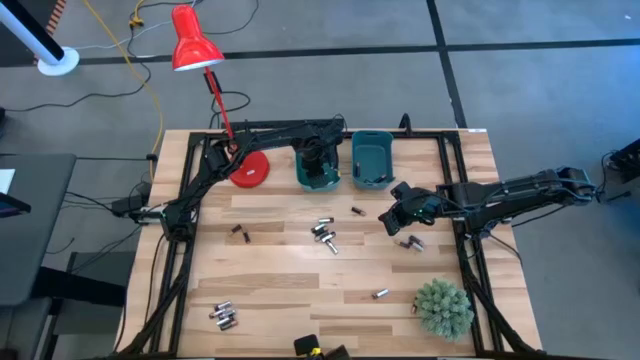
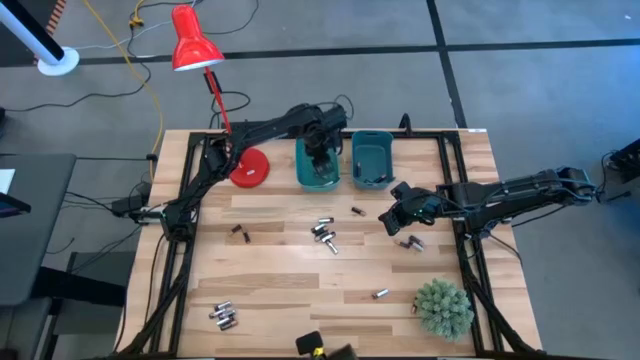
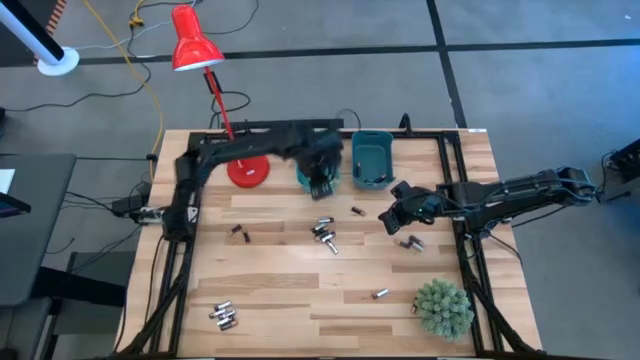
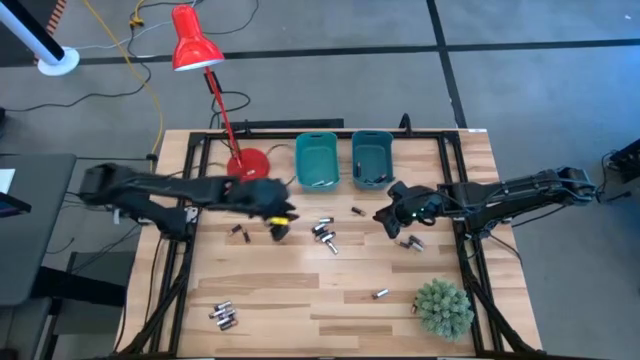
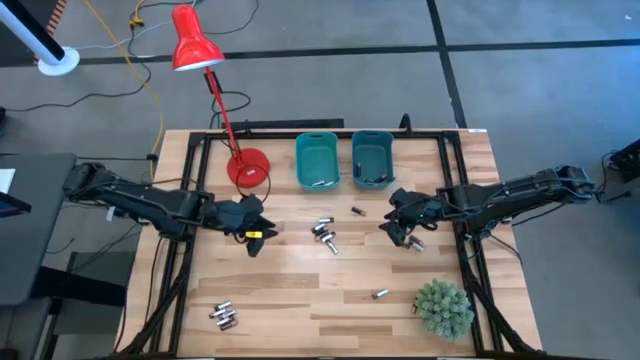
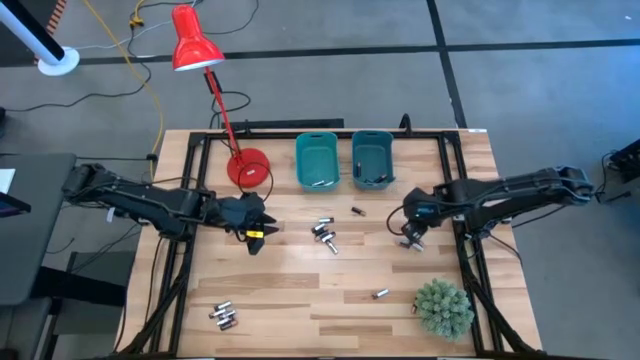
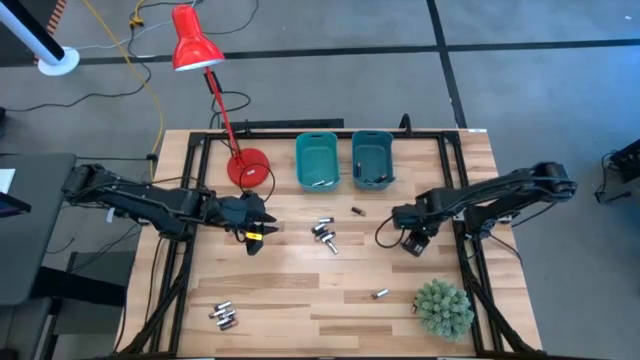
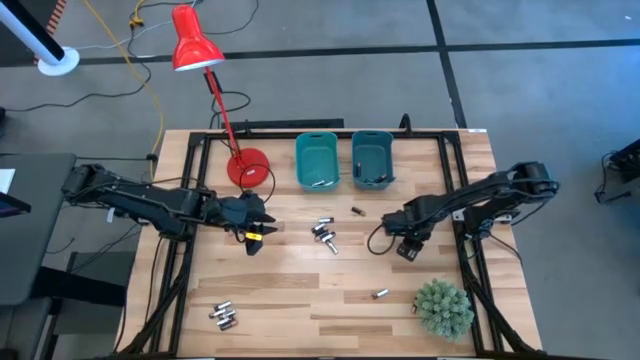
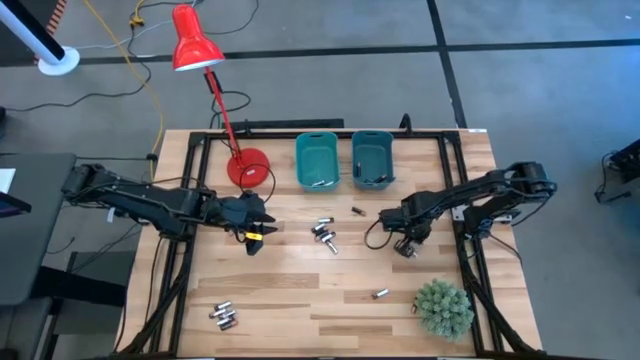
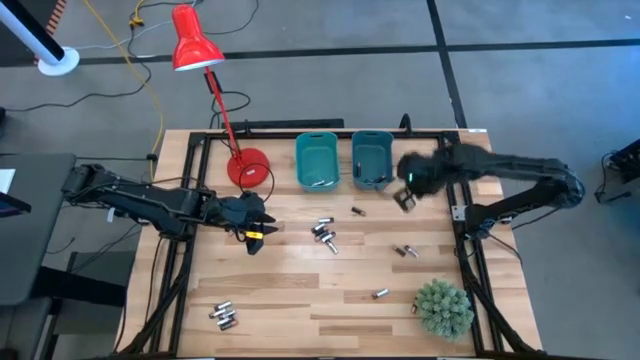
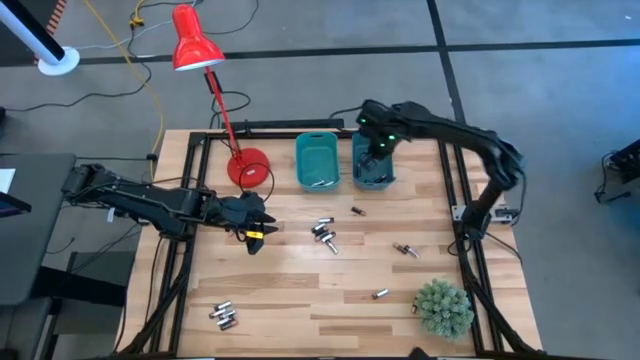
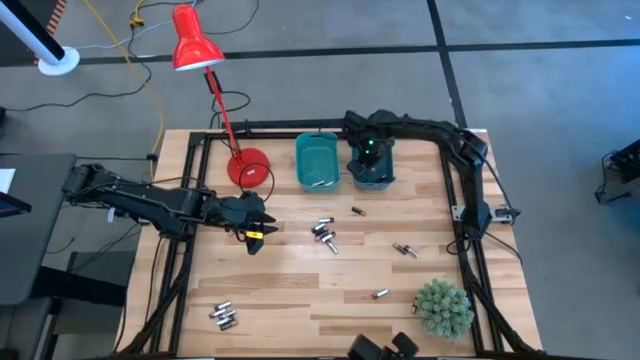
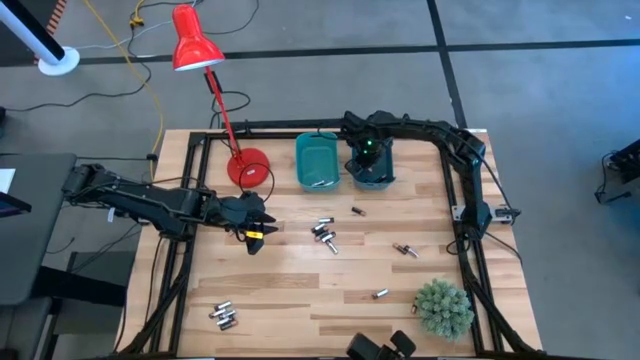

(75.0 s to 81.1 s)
Task: Sort batteries
Put the black battery into the blue bin

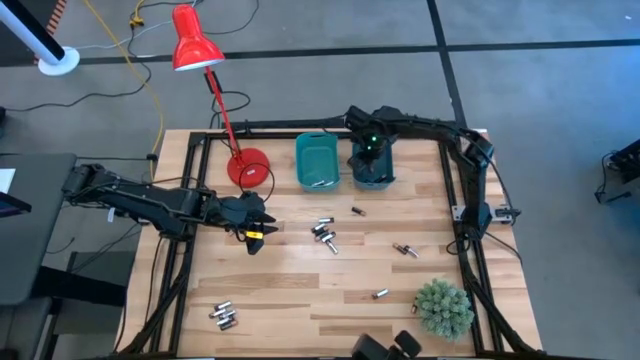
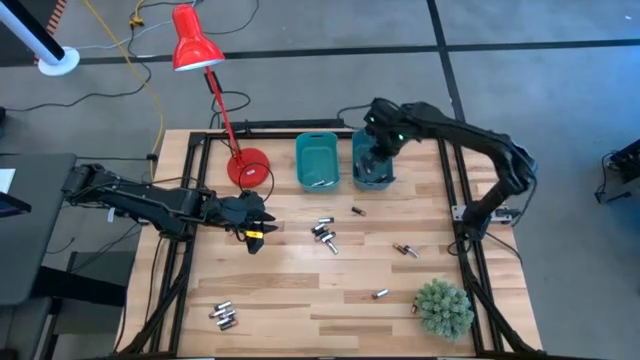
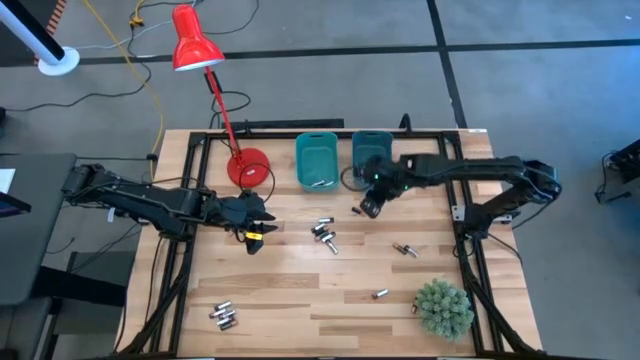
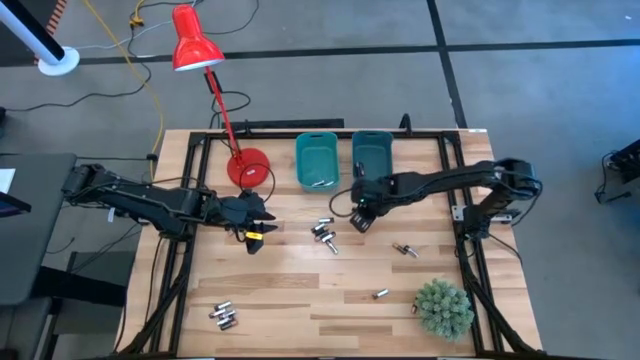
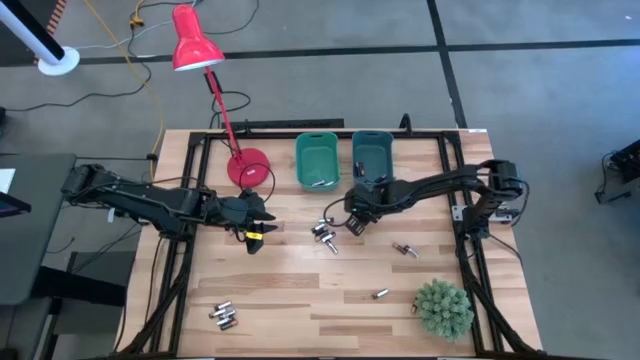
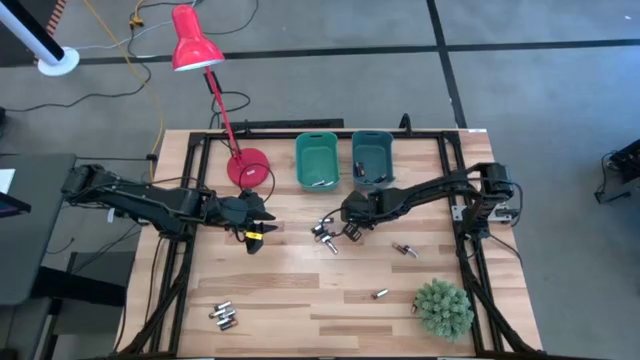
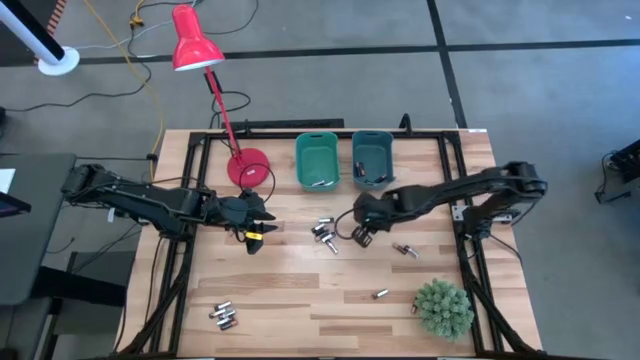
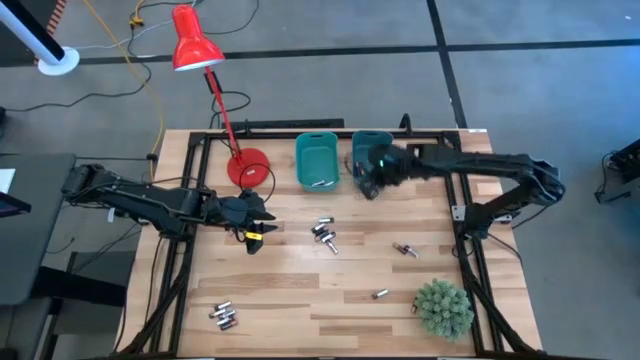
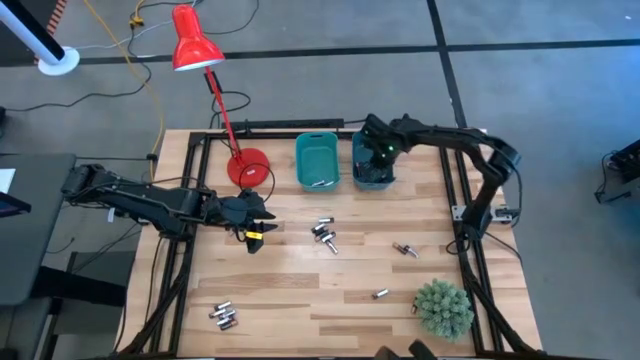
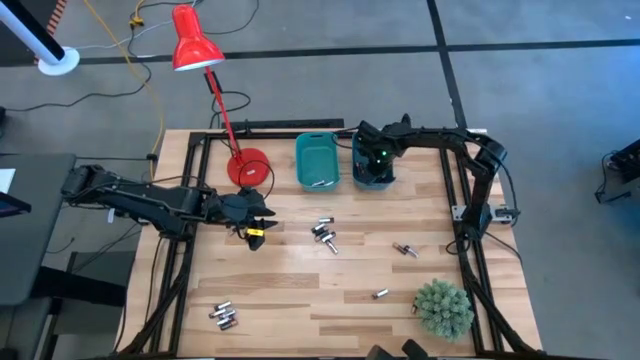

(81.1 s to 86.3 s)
Put the black battery into the blue bin

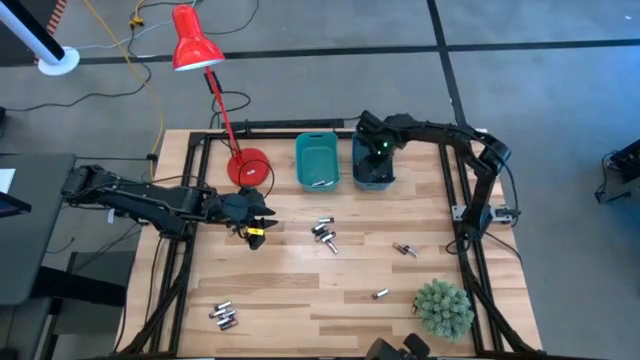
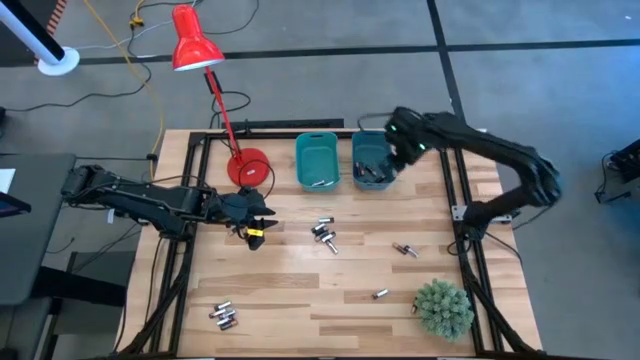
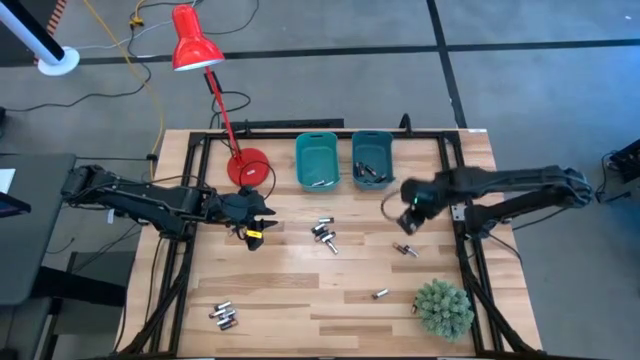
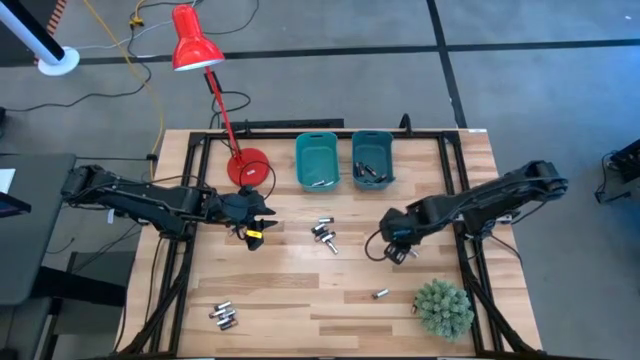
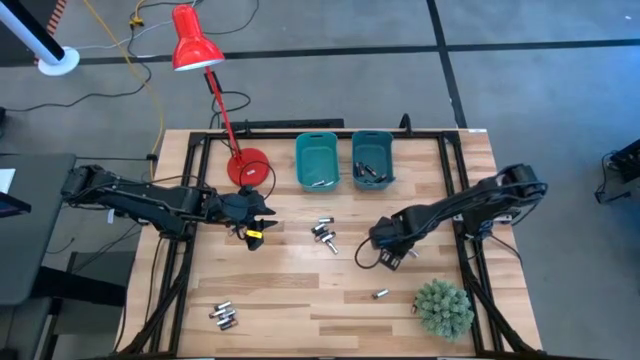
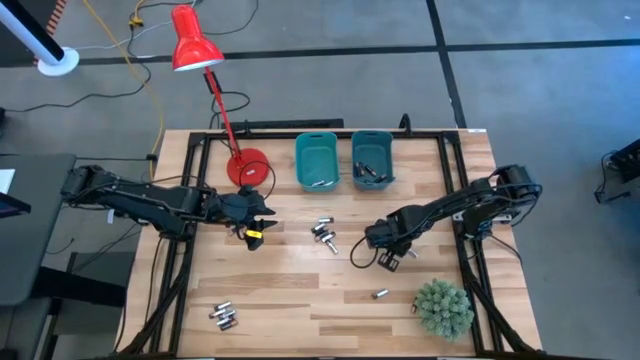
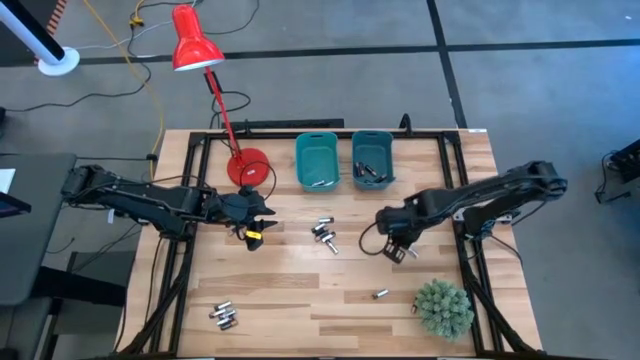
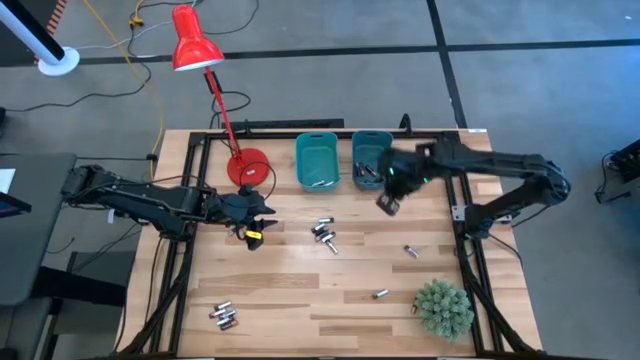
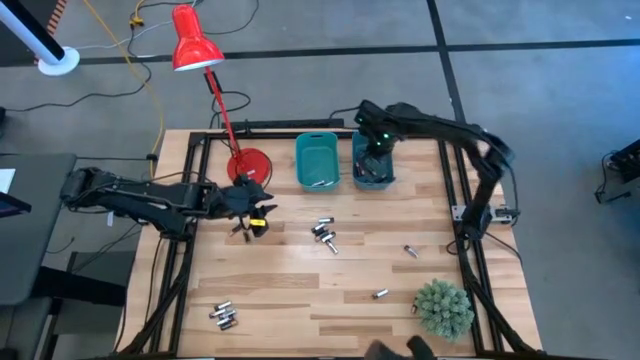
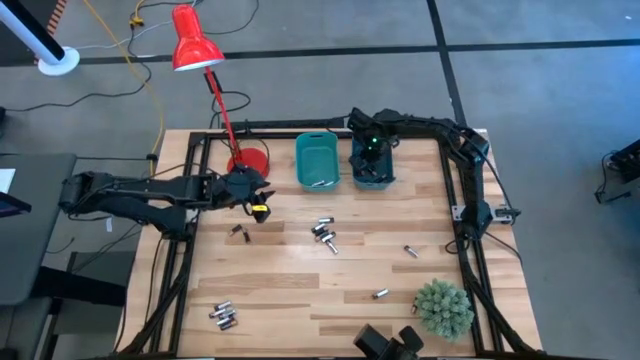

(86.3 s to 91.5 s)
Put the black battery into the blue bin

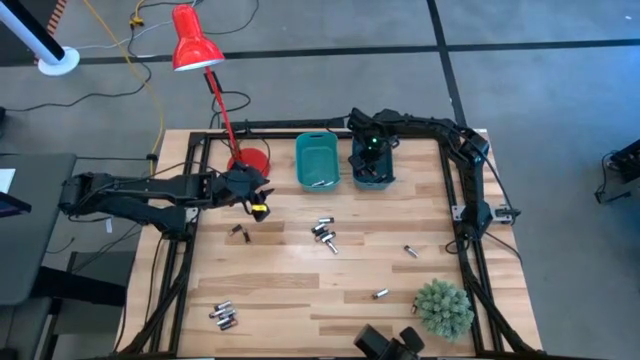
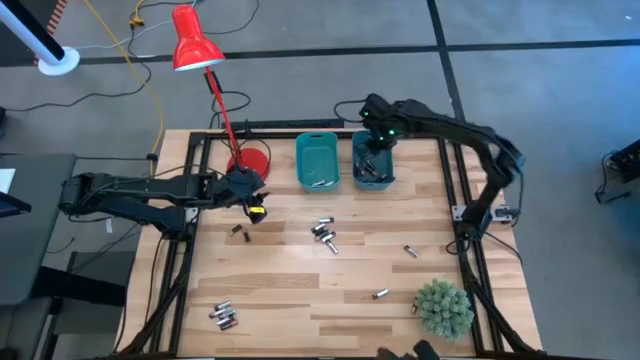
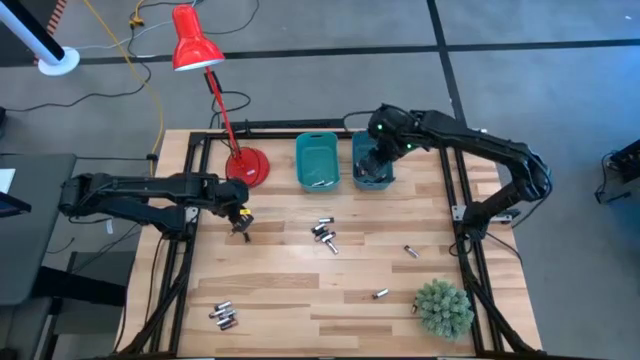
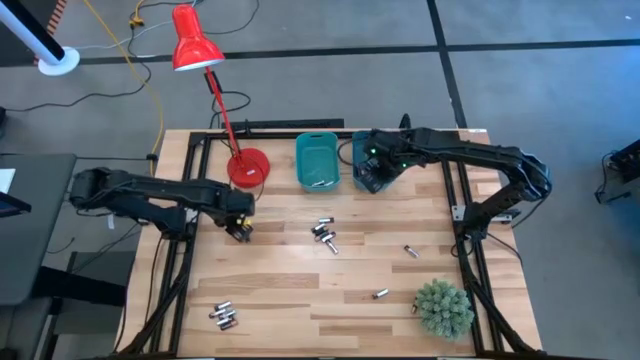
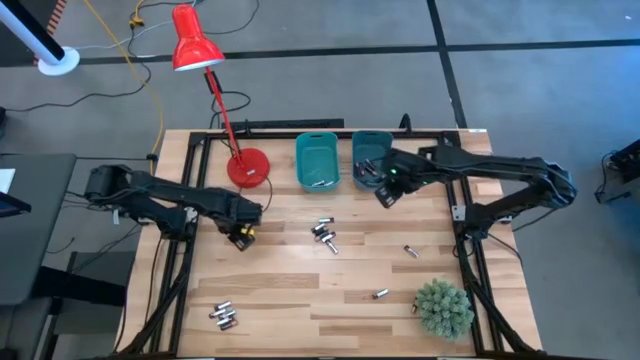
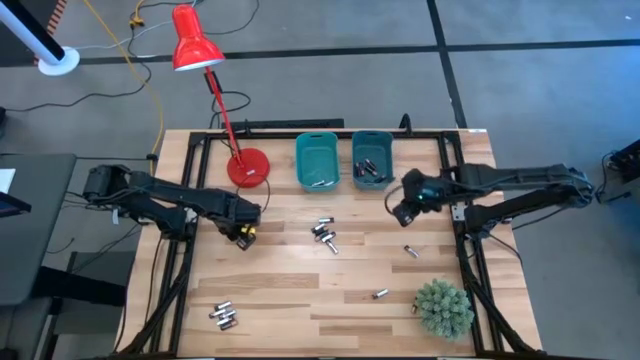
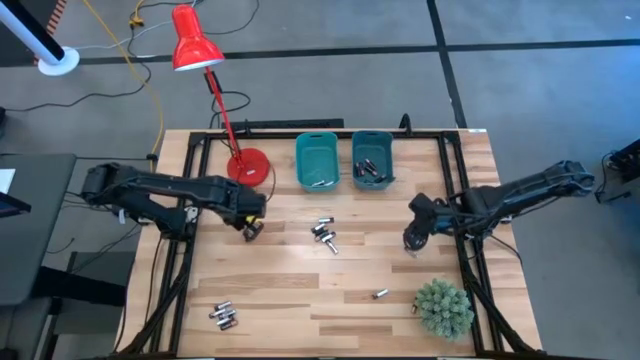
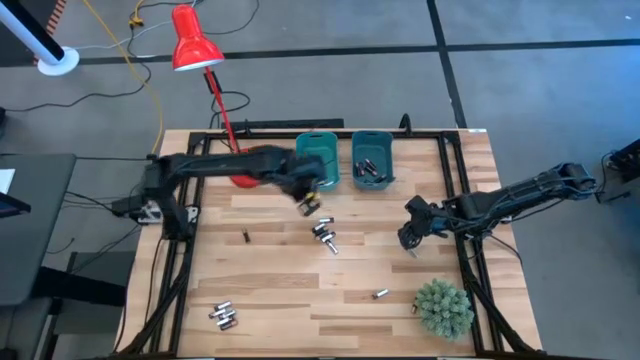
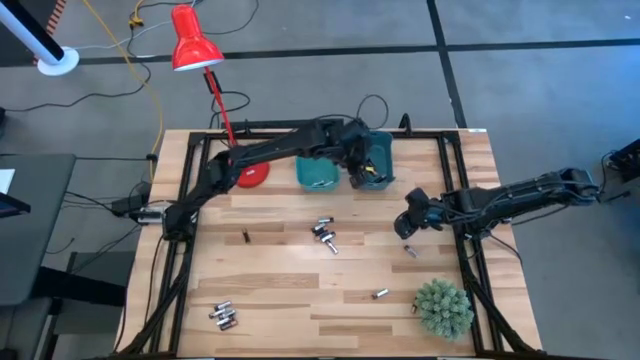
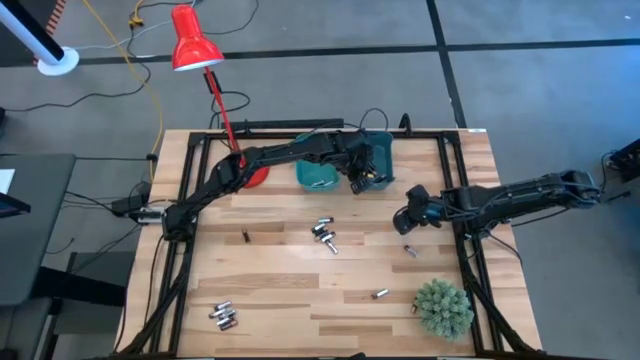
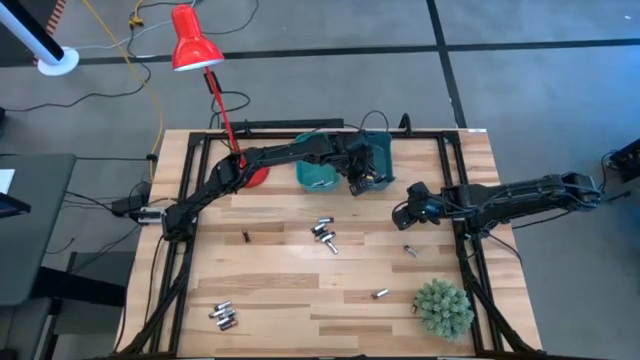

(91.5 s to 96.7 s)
Put the black battery into the blue bin
